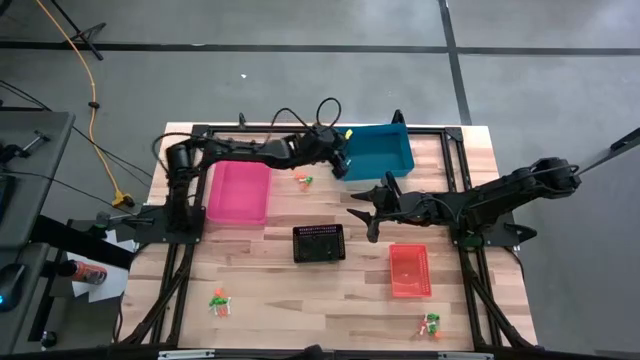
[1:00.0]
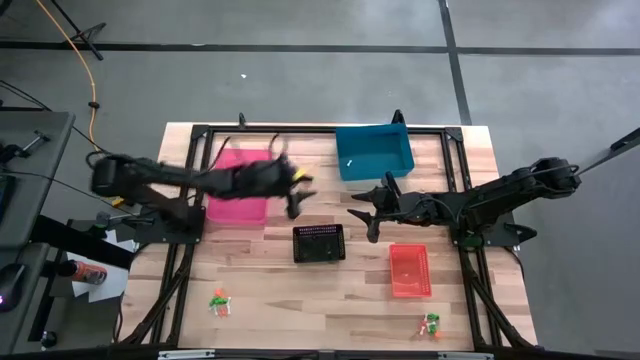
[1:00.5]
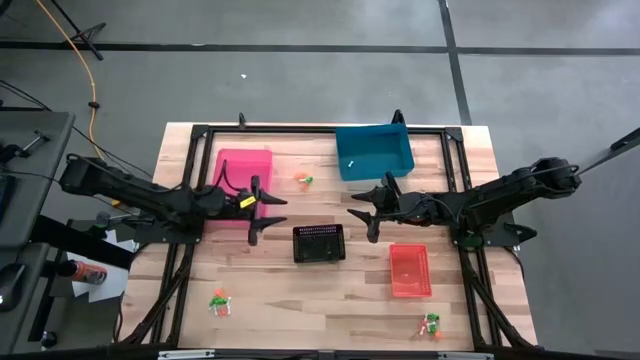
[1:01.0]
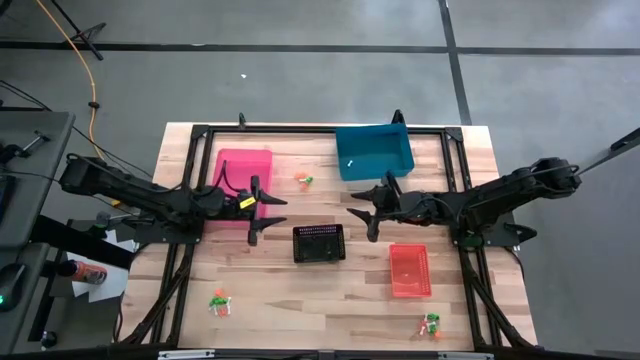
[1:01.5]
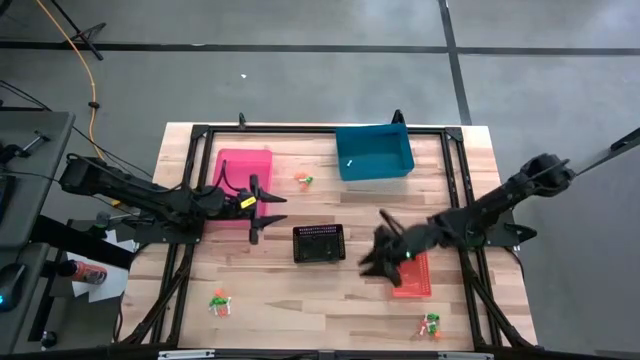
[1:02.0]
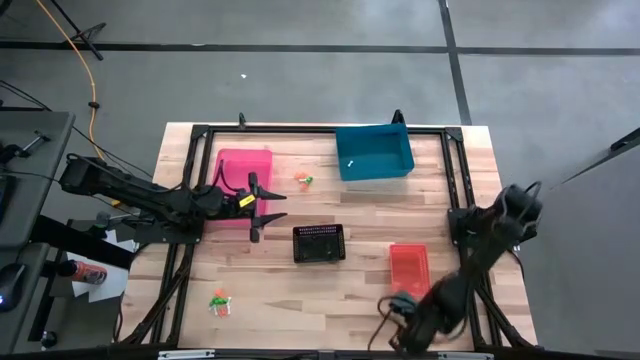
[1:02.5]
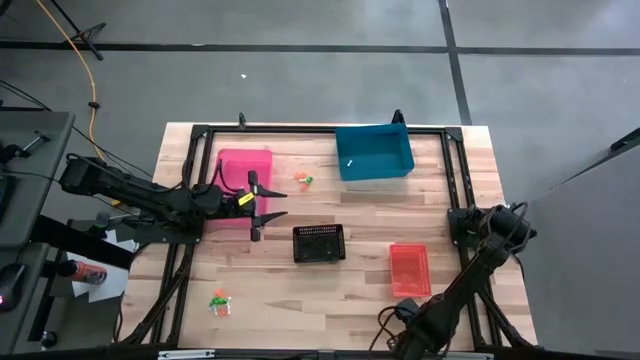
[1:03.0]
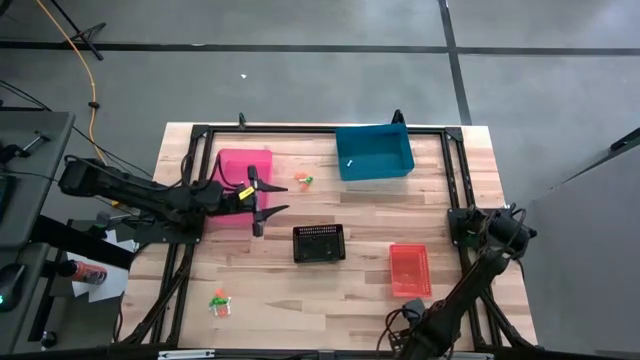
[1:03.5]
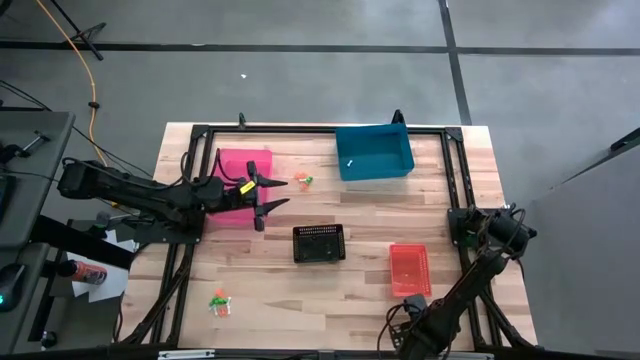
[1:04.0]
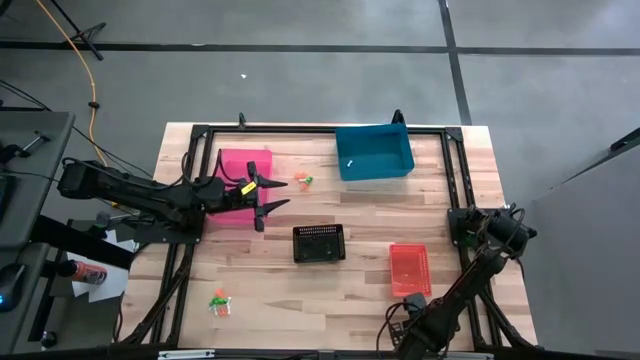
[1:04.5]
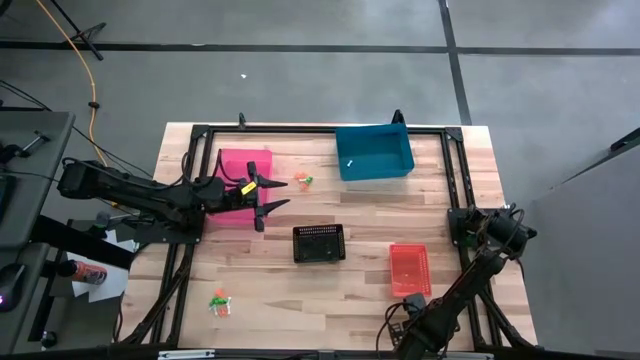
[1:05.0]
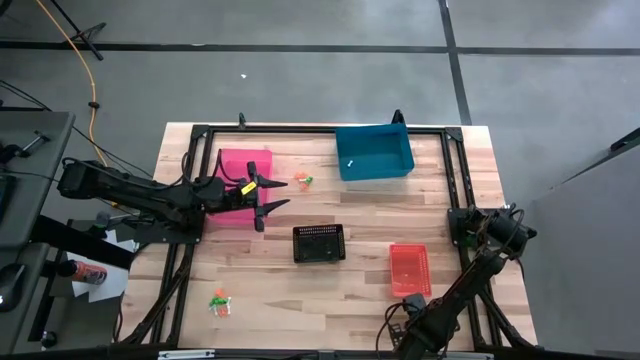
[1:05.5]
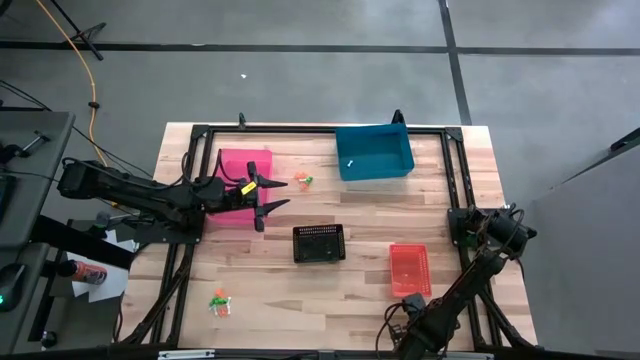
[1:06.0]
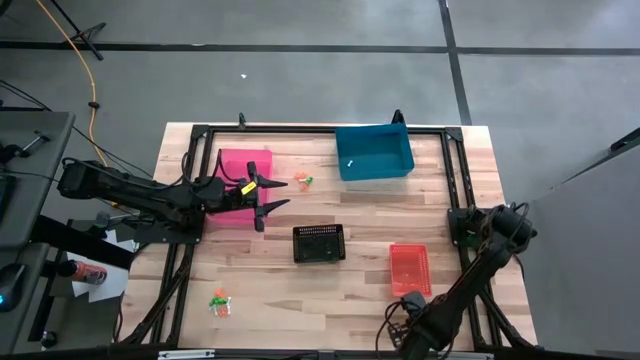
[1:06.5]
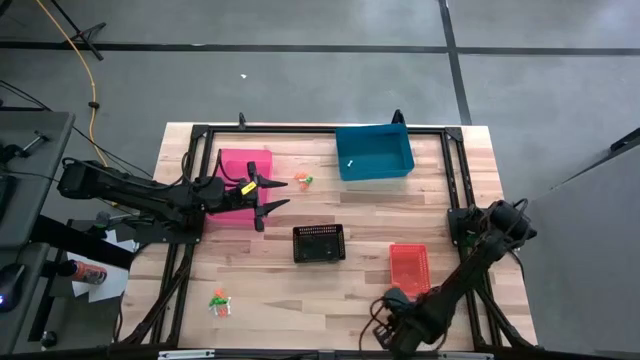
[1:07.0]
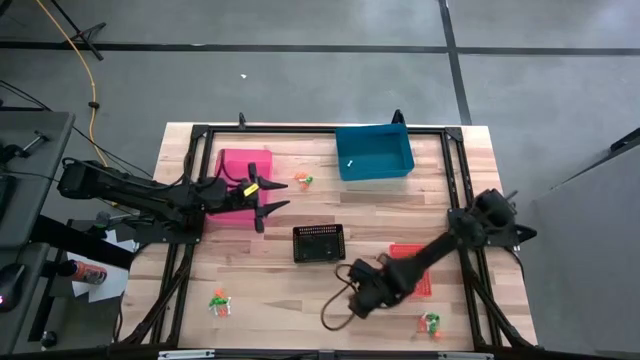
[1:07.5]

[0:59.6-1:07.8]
Task: Sort Halloween decoration
Put the white bone toy into the blue bin

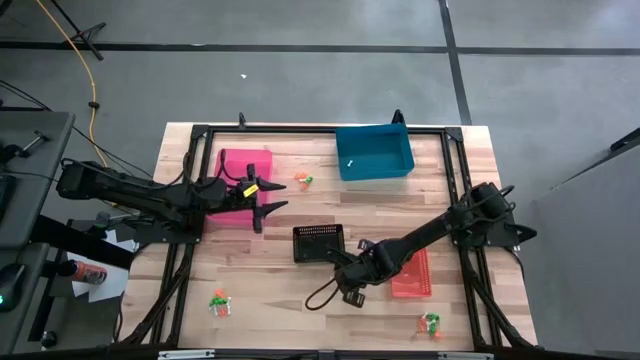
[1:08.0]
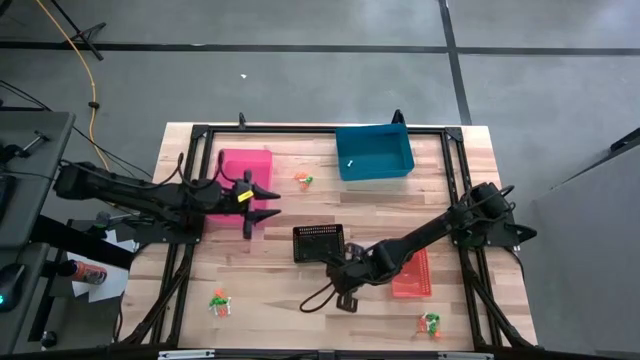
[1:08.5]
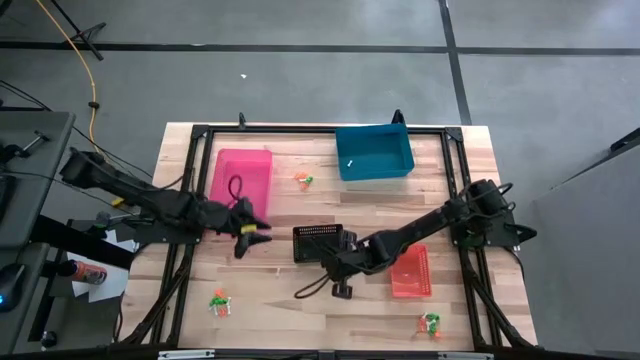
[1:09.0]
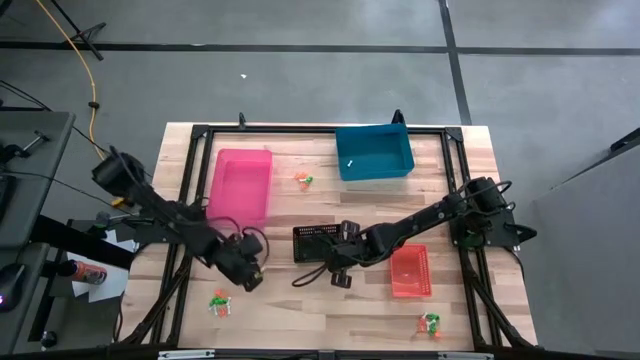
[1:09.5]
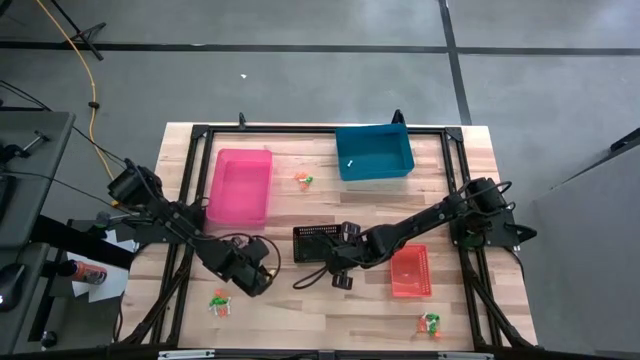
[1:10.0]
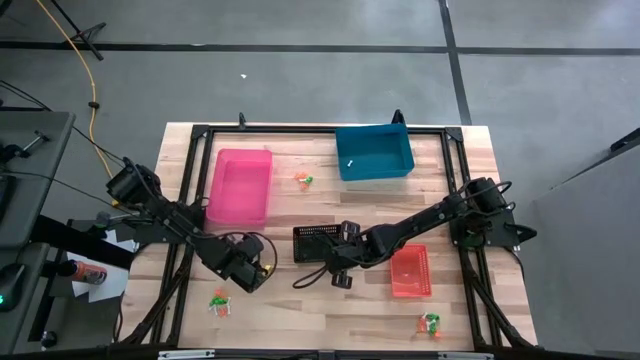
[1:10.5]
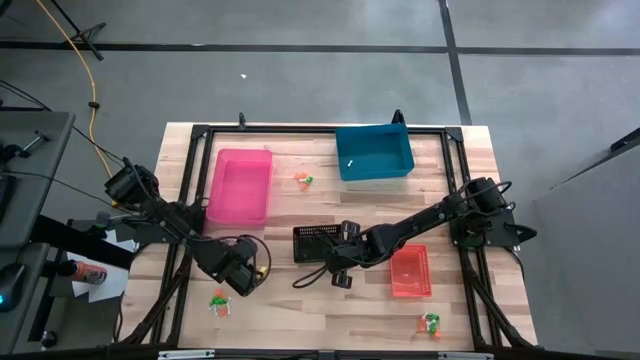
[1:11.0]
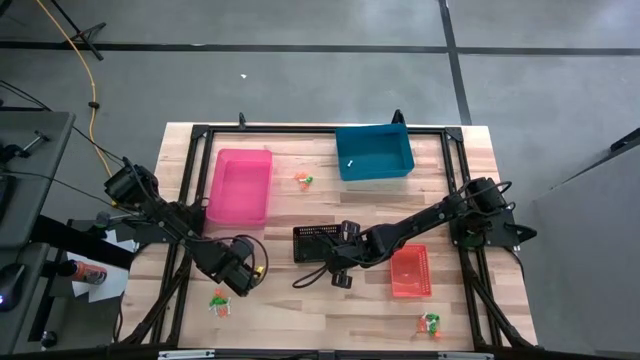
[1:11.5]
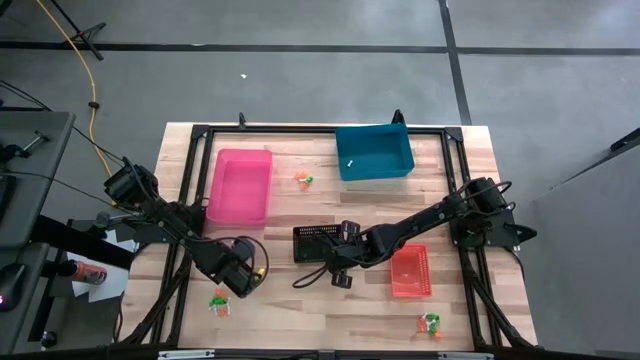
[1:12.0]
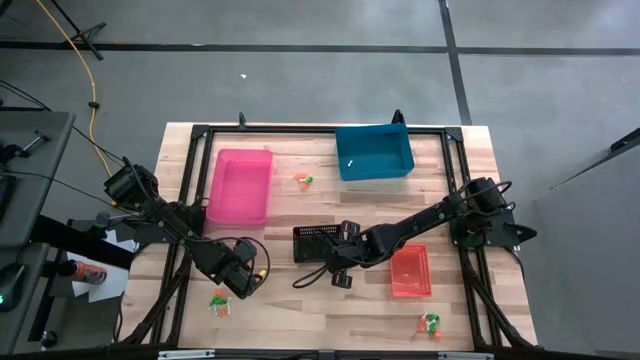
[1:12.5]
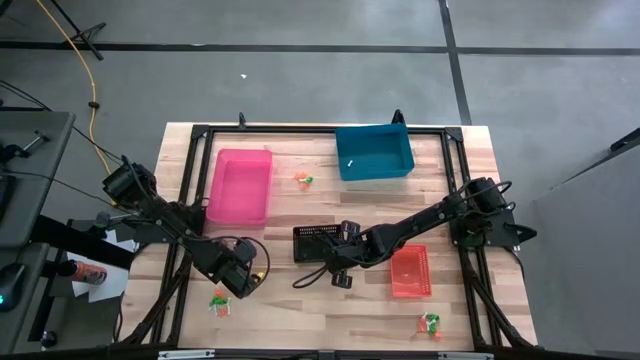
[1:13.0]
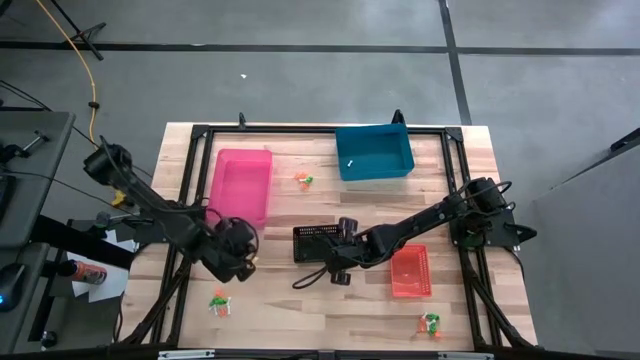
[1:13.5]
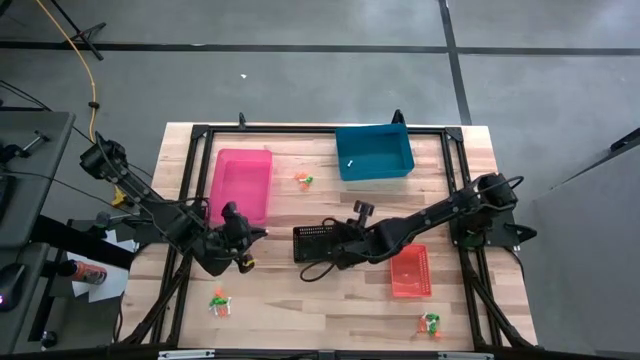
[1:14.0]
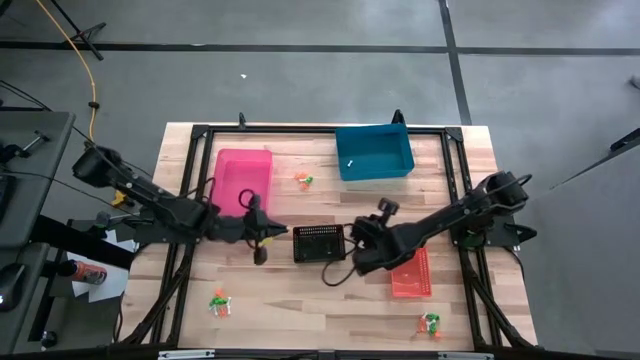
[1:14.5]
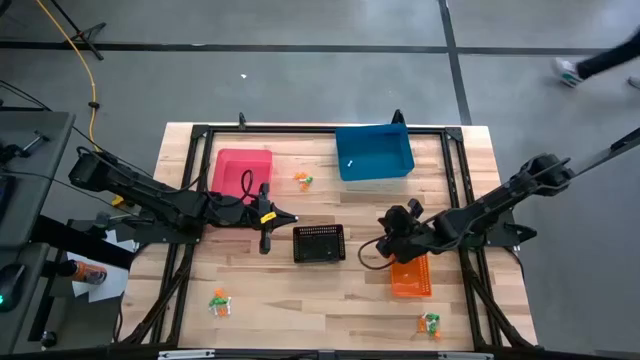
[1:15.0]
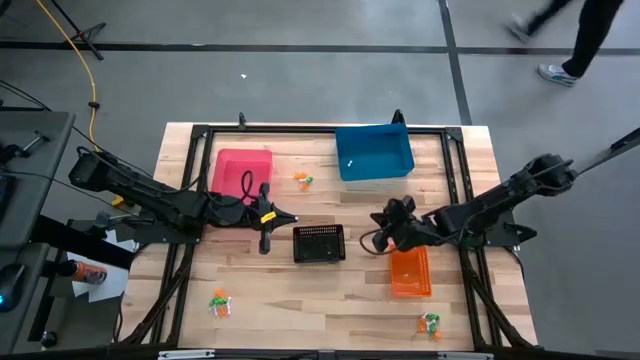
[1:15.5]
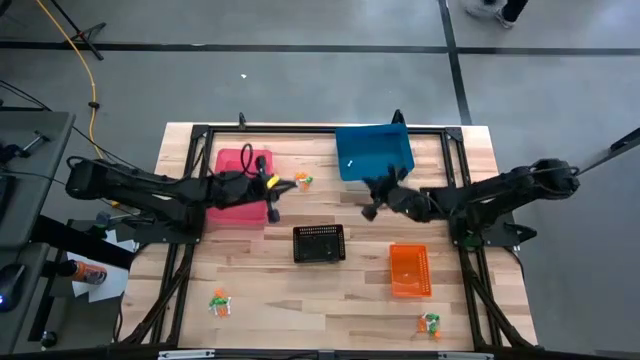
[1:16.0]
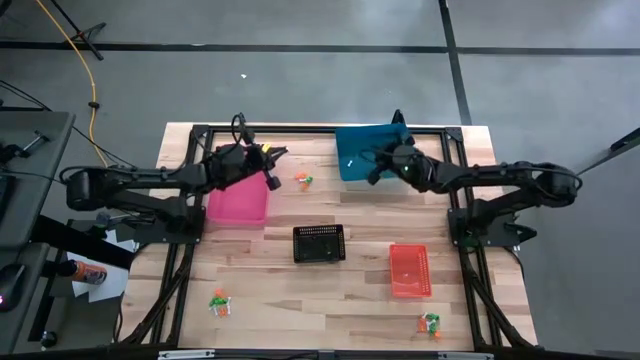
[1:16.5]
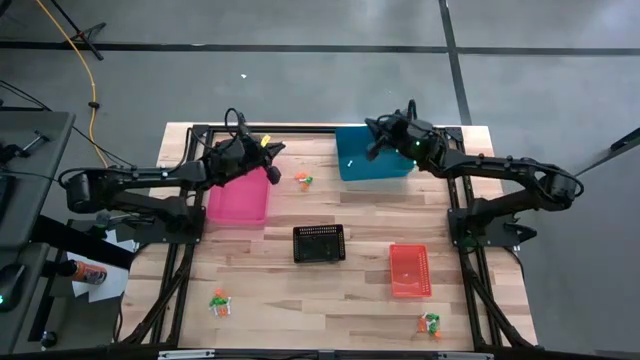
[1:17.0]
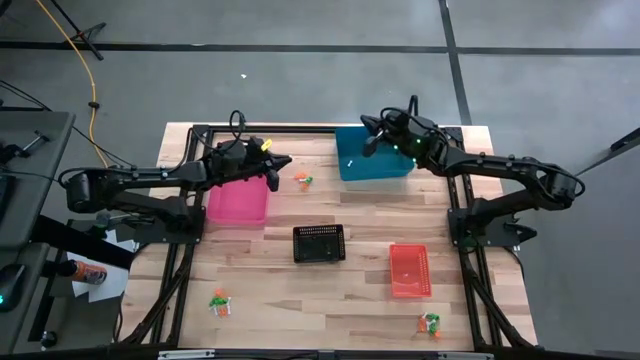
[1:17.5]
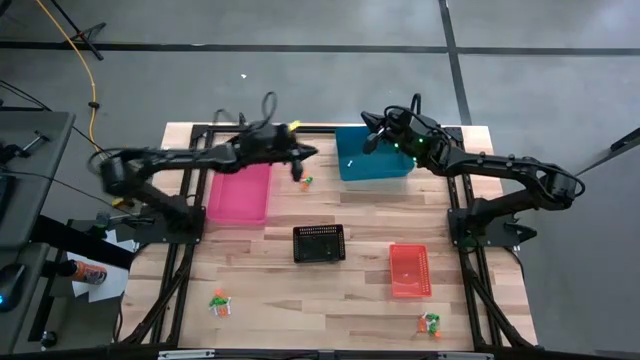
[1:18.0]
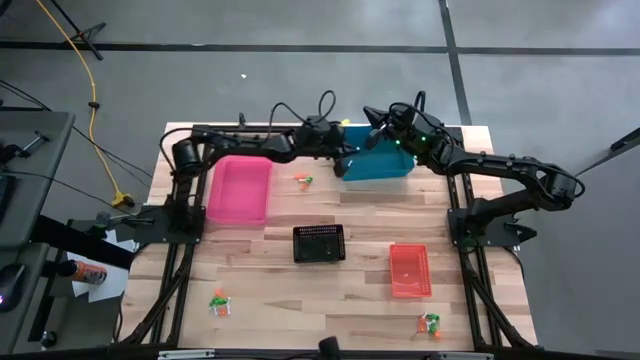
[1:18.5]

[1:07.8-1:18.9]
Put the white bone toy into the blue bin

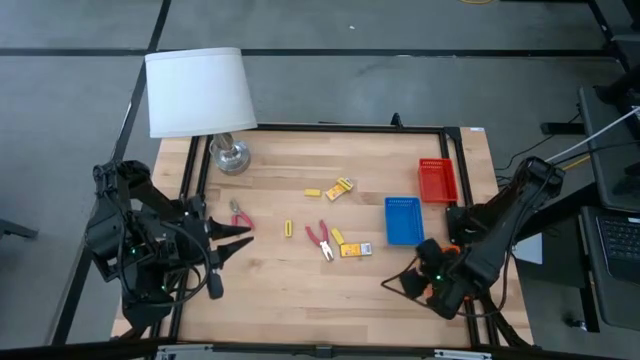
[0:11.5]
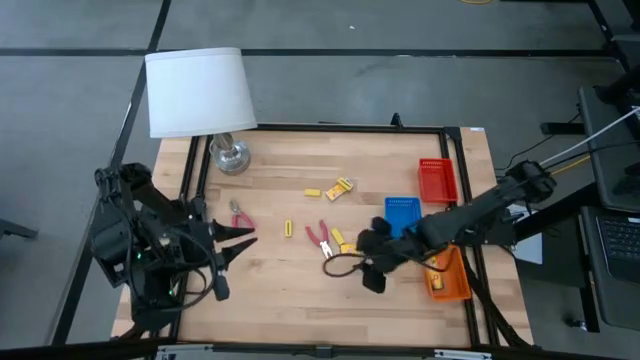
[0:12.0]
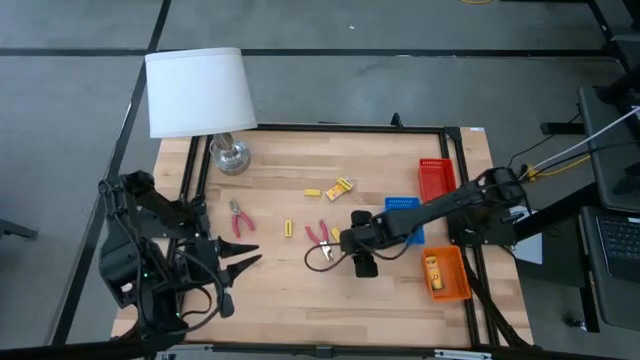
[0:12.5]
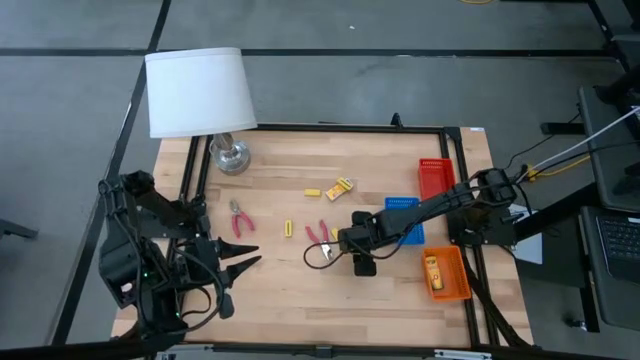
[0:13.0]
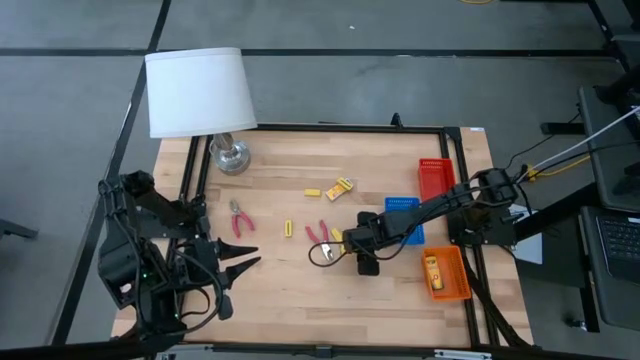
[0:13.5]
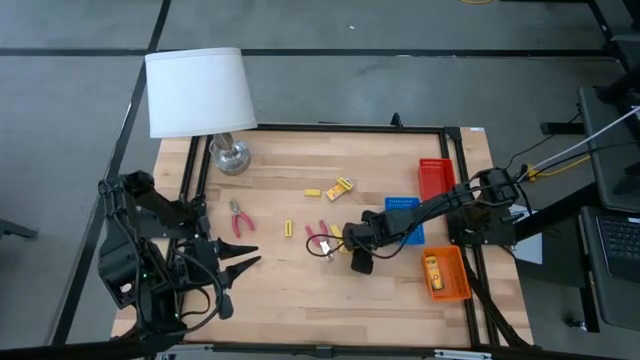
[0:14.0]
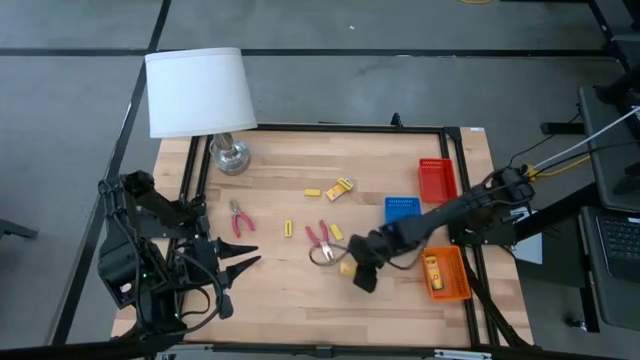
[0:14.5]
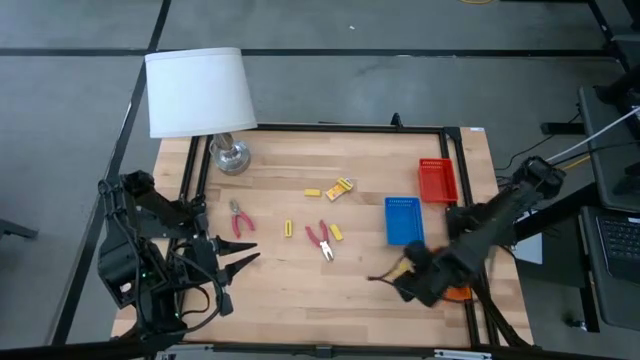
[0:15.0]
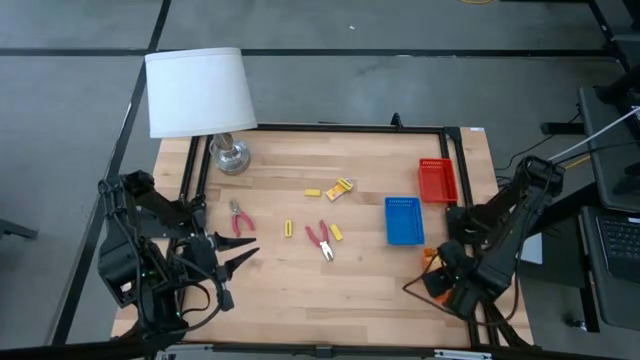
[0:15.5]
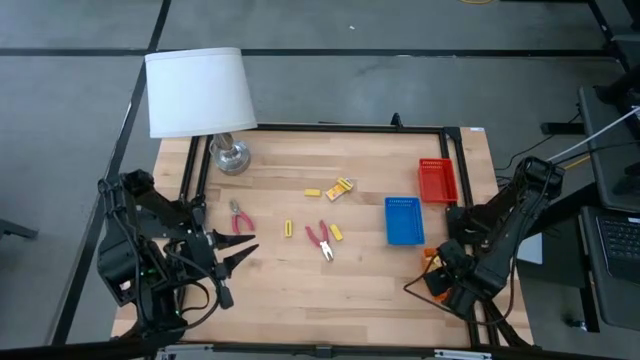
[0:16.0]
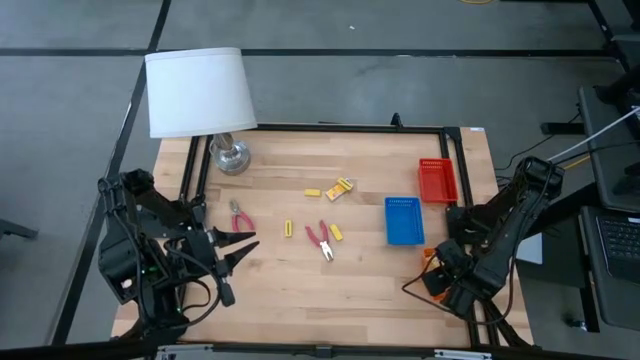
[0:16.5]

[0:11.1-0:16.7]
Task: Pick & Place School Supplies
Put the bottom box of crayons into the orange bin
